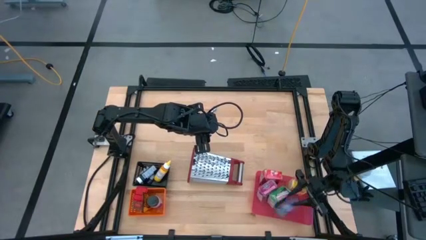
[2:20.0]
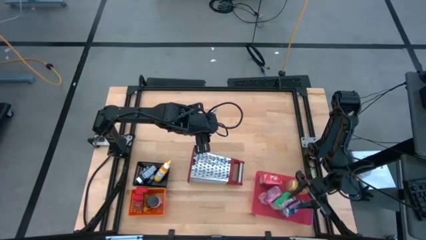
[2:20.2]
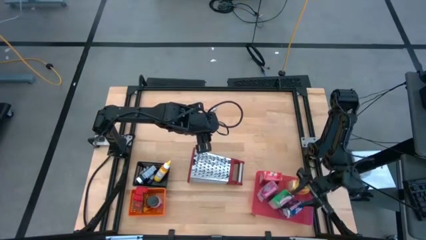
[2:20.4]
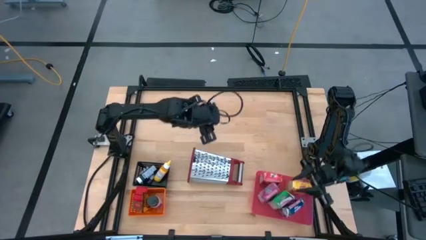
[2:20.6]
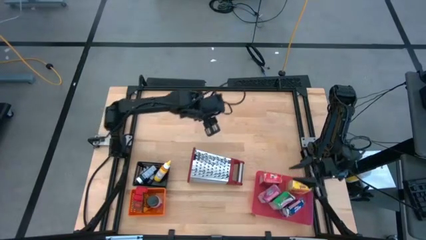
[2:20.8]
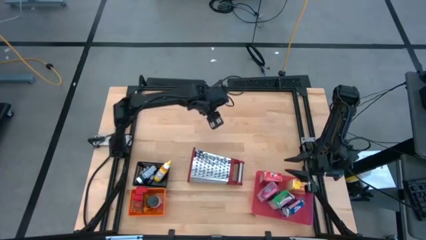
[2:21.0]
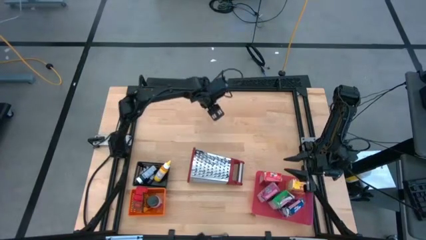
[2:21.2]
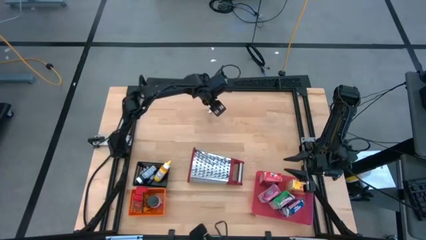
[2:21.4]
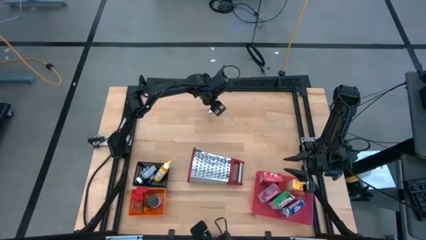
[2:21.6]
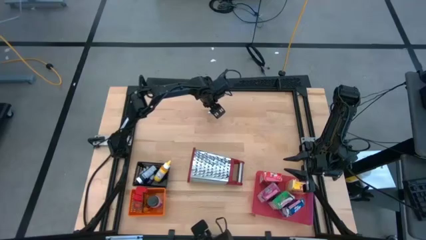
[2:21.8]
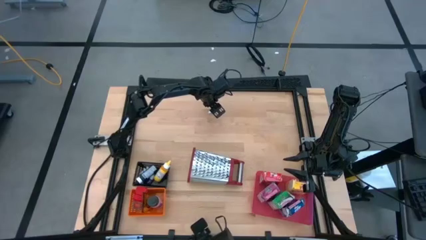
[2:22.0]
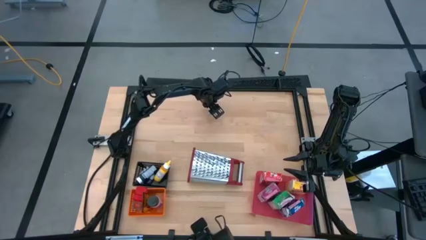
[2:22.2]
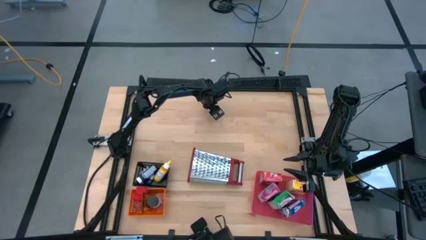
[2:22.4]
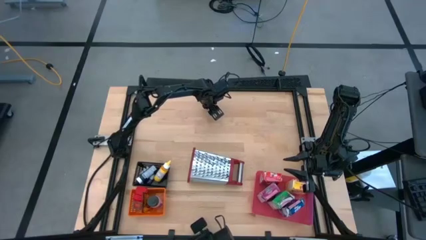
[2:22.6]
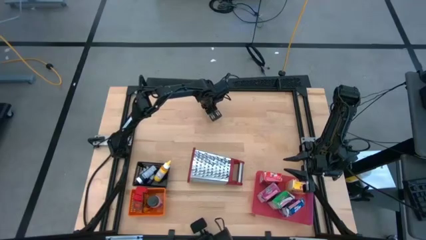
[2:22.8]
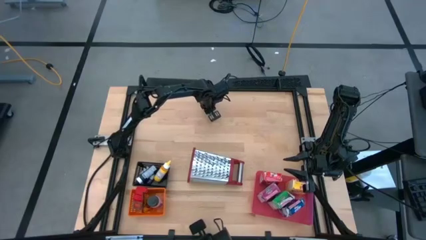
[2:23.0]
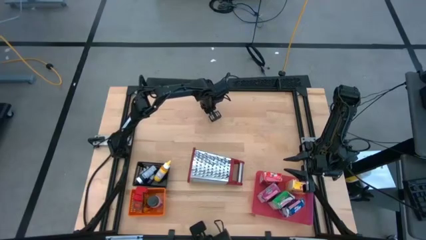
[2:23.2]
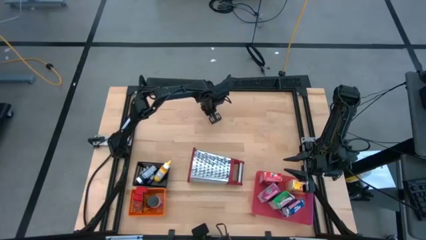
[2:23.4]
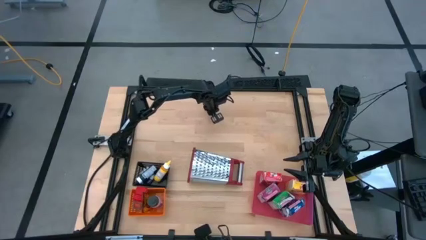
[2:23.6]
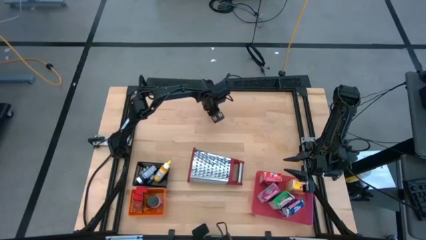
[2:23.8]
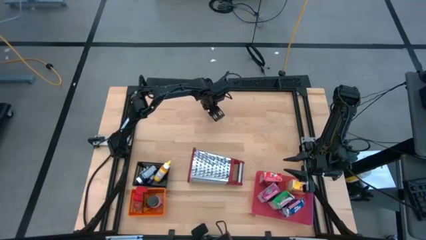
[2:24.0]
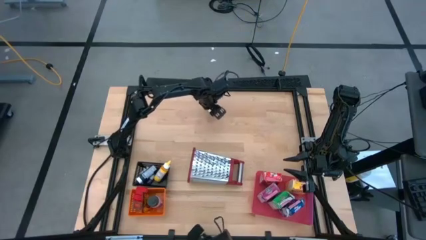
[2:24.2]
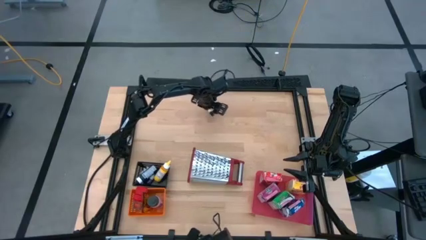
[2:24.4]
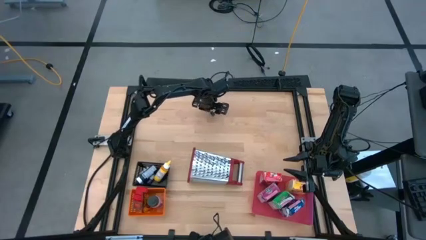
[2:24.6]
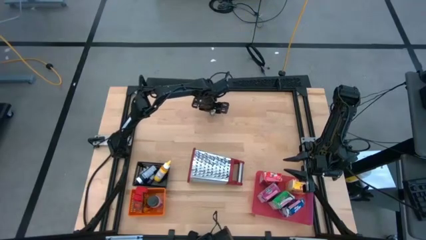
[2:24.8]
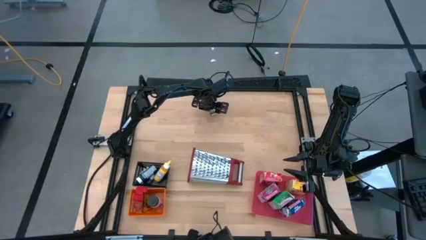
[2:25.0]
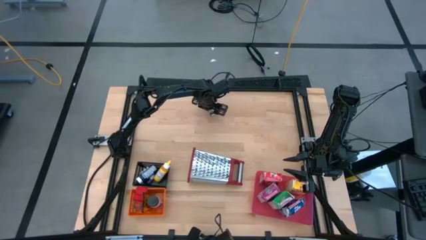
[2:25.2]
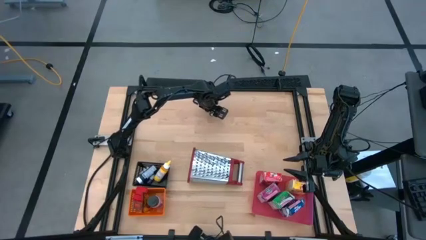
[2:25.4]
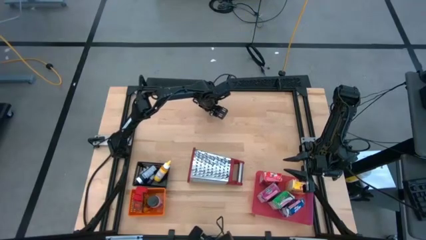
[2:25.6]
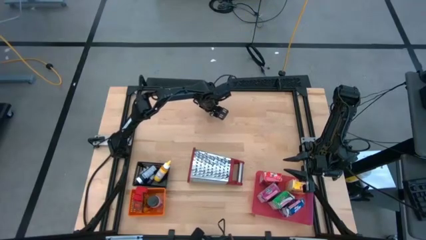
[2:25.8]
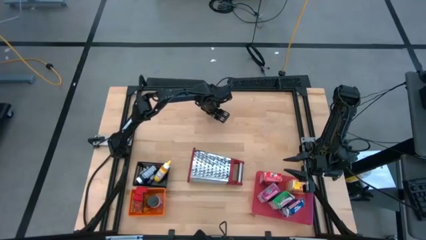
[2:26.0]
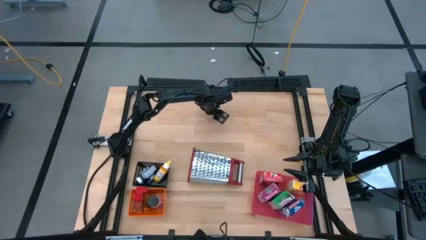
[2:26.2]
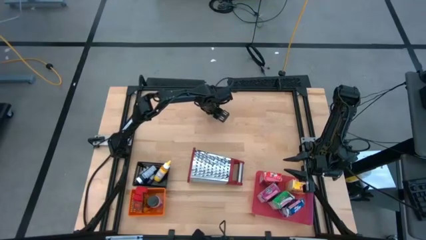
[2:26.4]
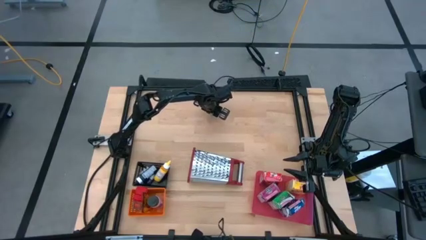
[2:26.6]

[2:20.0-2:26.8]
Task: Pick & Place Kitchen Items
Put the small brown food coloring bottle into the black bin

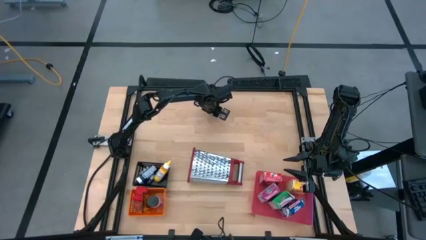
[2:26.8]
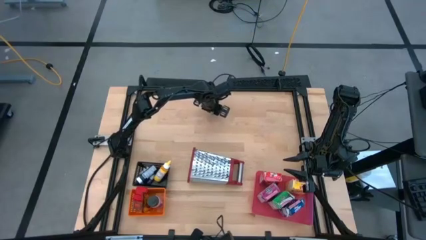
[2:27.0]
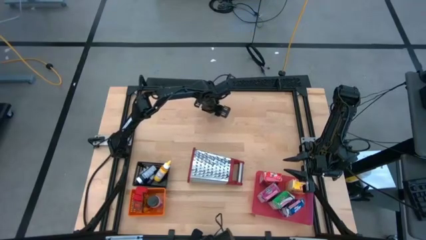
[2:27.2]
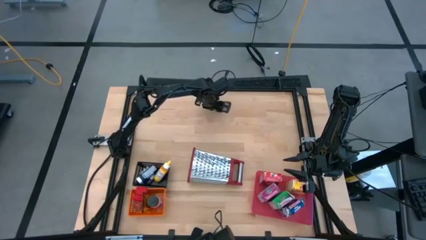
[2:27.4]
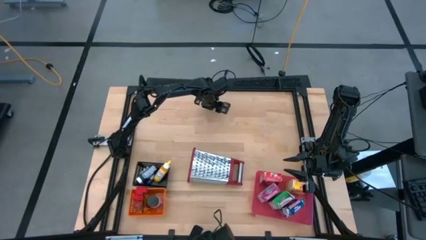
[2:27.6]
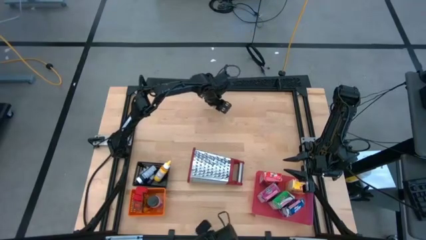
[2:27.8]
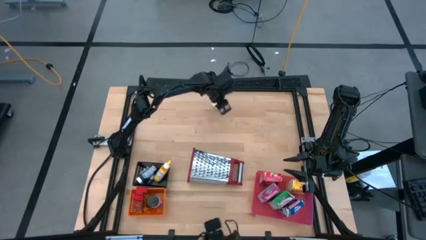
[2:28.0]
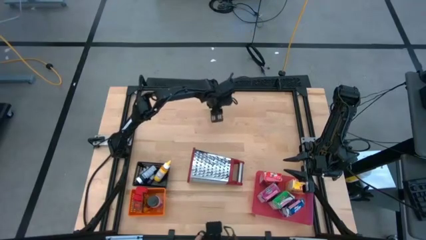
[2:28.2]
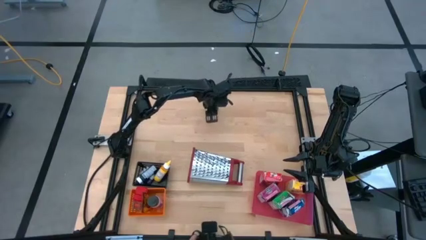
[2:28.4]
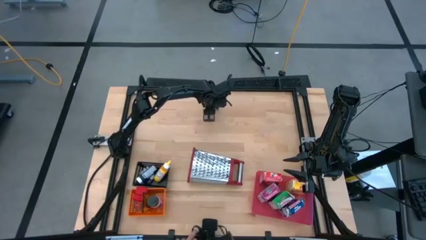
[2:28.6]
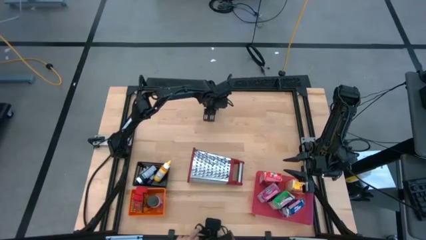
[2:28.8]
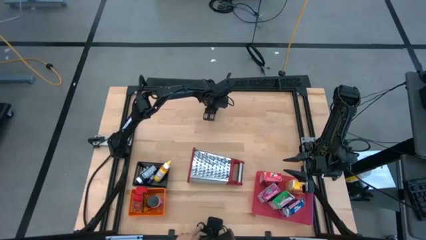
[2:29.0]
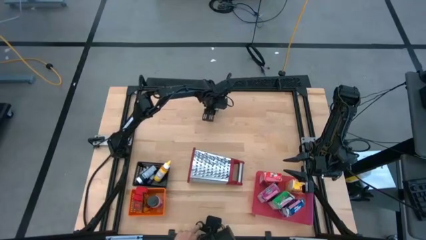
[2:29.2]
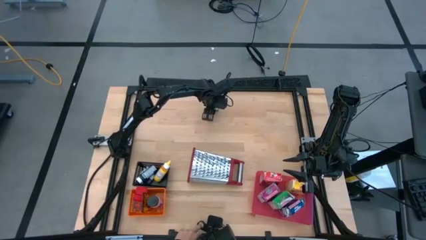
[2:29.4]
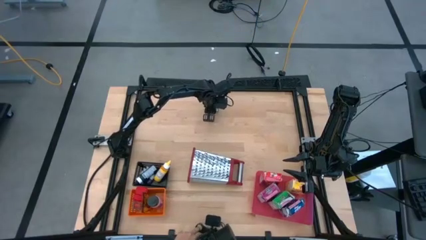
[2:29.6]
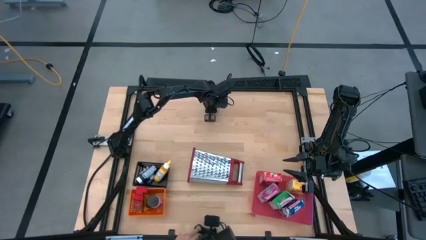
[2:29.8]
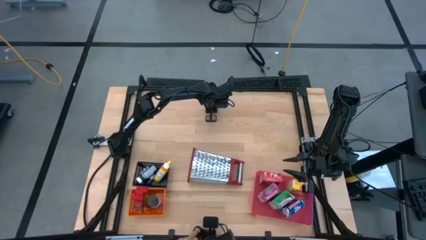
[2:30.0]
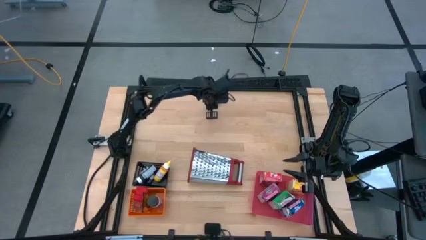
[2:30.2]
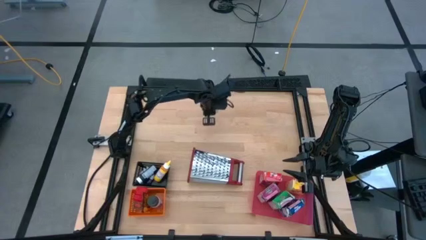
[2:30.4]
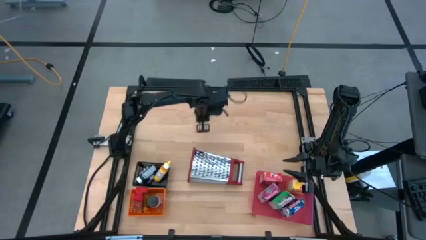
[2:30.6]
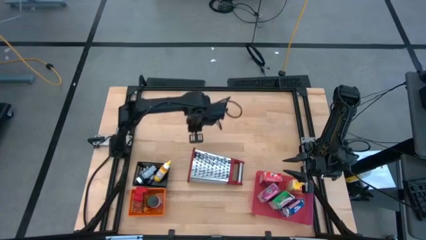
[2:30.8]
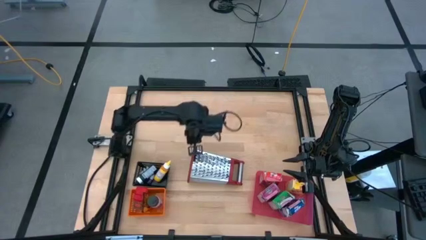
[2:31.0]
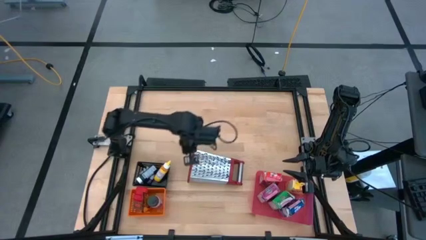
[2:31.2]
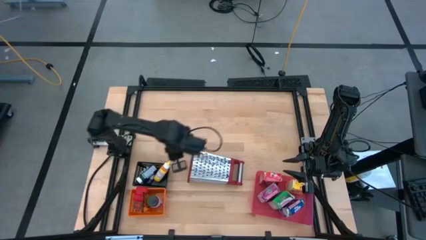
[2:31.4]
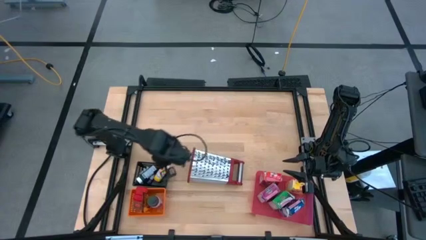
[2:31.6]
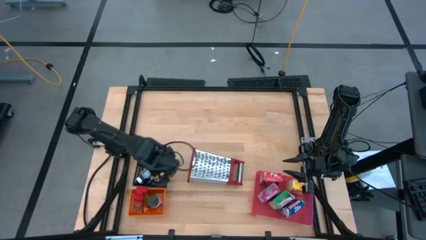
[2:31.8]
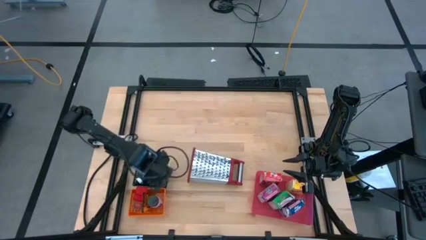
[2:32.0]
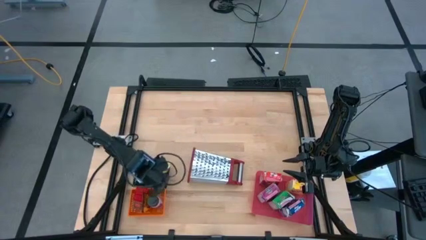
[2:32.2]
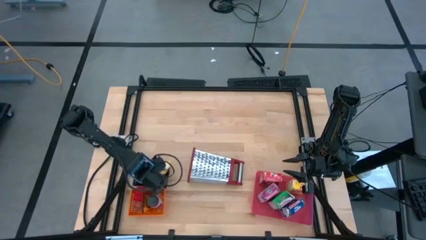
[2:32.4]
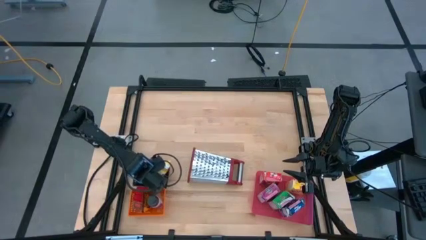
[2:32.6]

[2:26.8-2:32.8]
Put the small brown food coloring bottle into the black bin

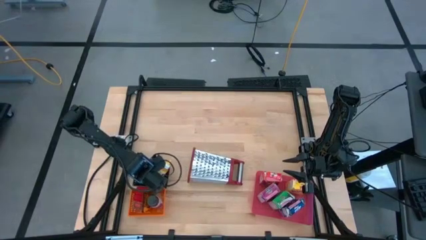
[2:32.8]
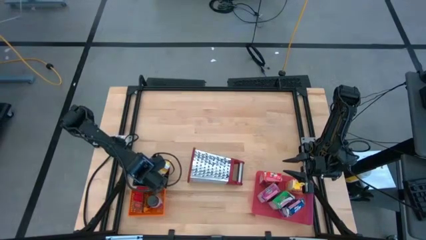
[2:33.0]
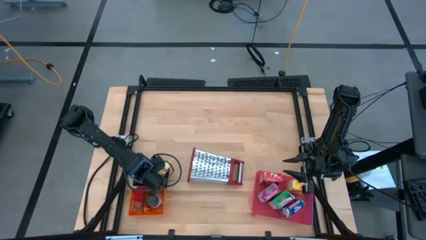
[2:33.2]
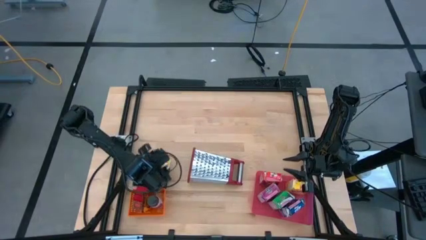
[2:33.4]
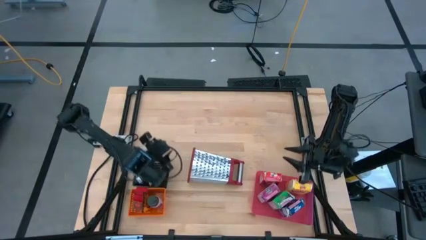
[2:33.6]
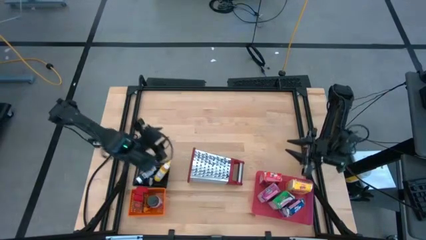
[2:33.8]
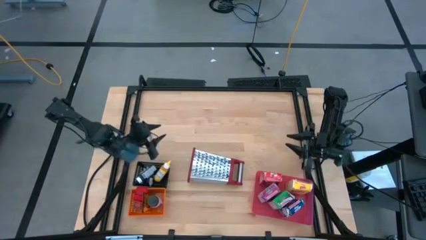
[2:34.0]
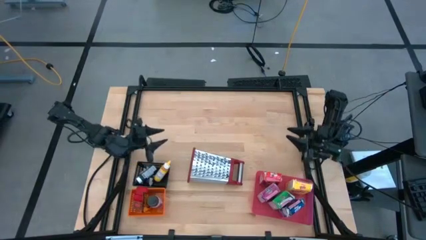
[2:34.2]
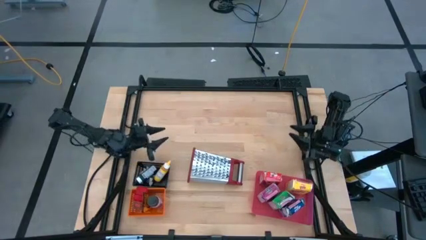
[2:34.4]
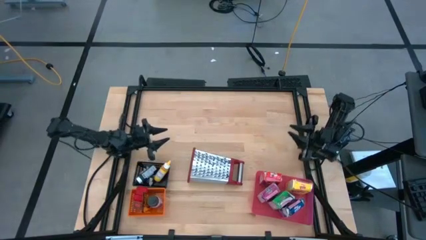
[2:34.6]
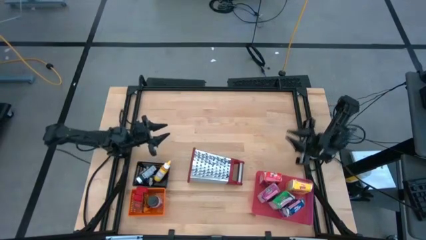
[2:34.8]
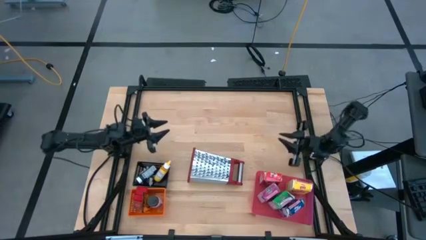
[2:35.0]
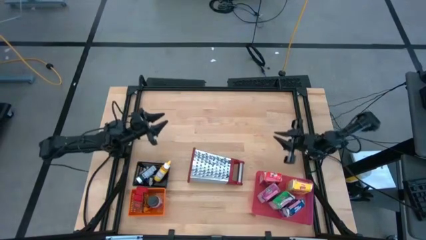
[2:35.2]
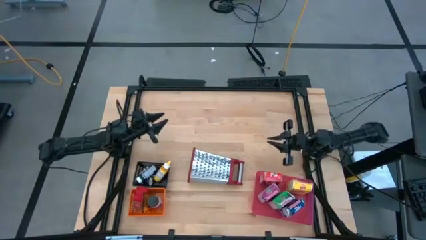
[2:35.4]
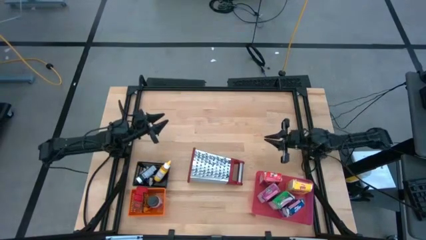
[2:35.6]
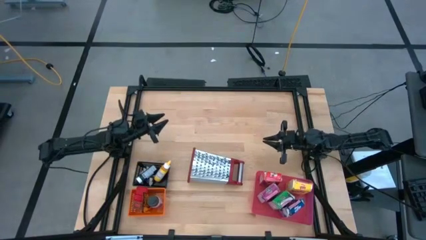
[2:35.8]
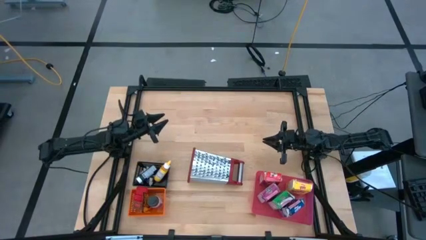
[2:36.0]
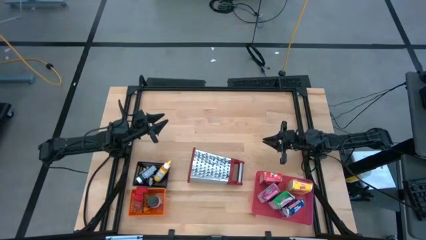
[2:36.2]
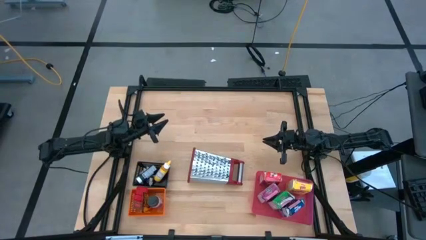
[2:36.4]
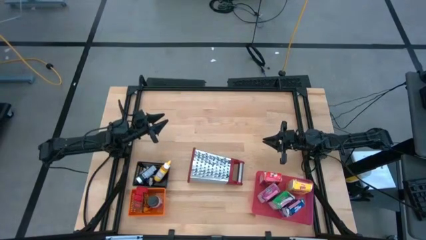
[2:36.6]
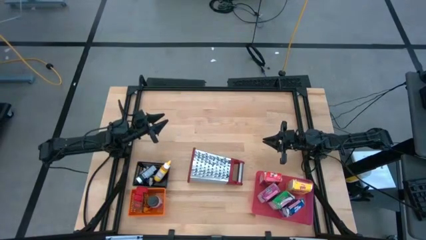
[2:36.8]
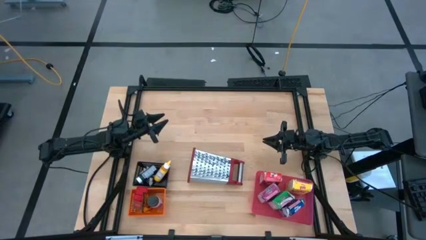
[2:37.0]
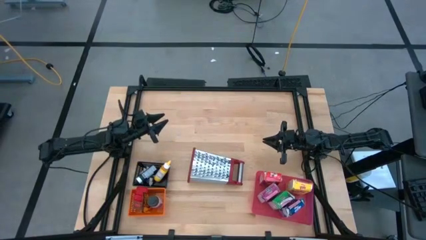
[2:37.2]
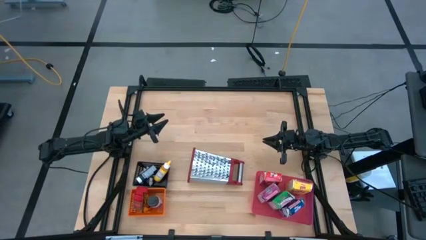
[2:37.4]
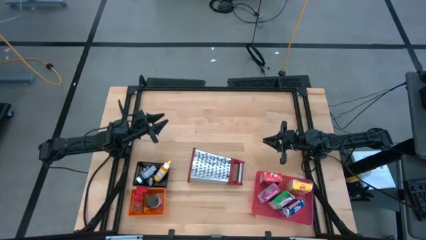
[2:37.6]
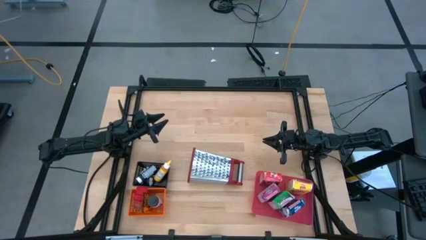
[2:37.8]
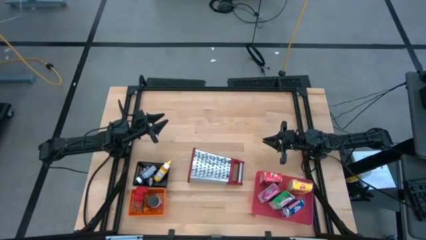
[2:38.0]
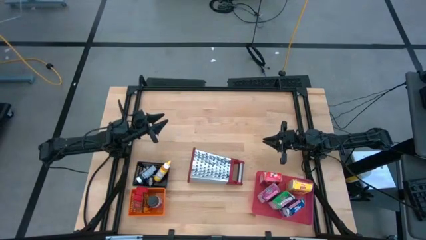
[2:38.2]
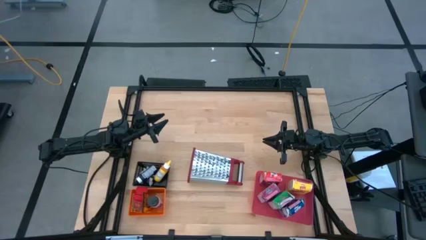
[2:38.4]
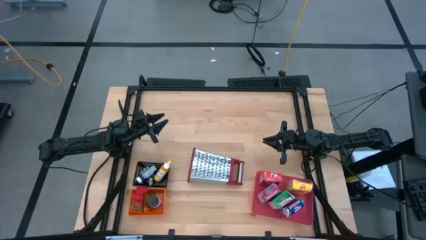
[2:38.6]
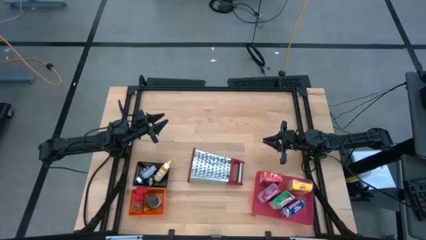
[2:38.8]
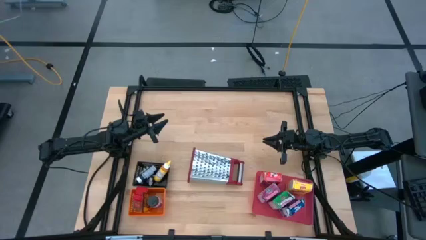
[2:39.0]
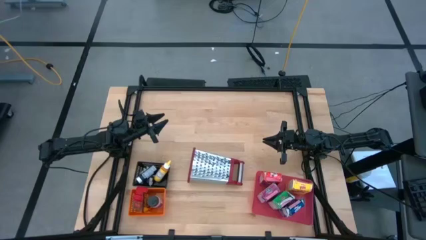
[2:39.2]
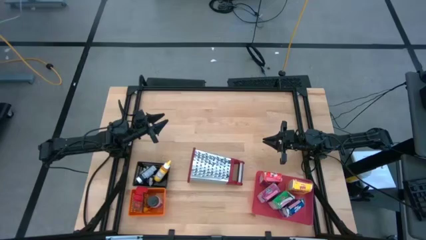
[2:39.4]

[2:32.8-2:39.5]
Return to Home Position
